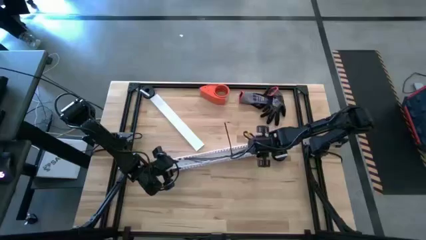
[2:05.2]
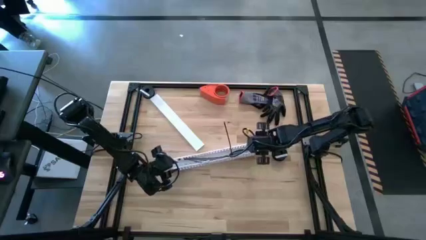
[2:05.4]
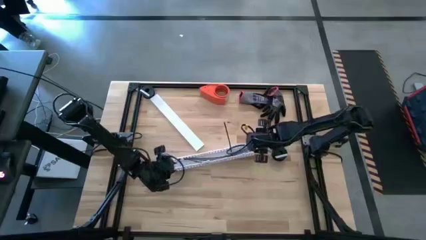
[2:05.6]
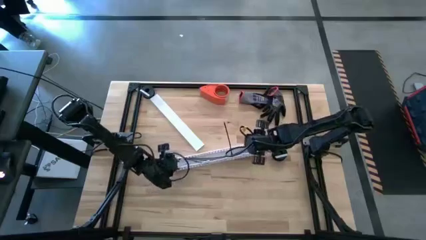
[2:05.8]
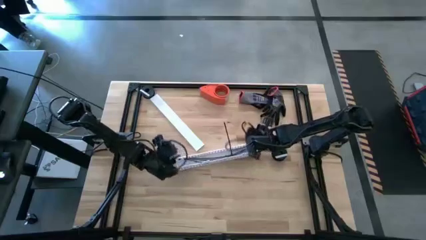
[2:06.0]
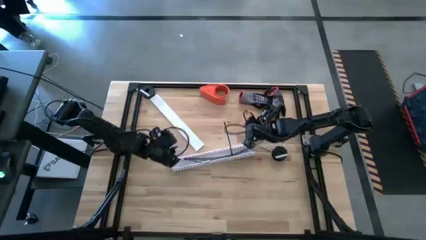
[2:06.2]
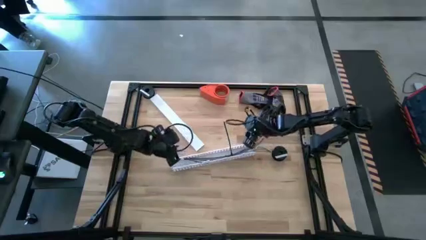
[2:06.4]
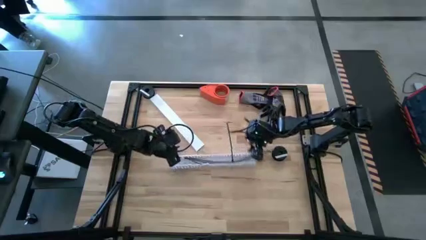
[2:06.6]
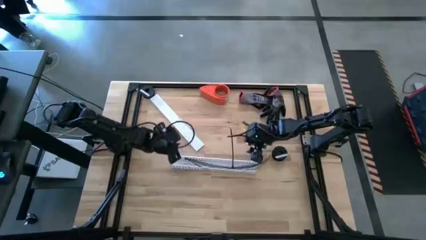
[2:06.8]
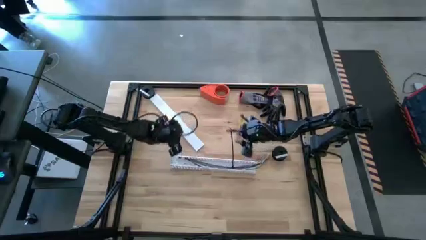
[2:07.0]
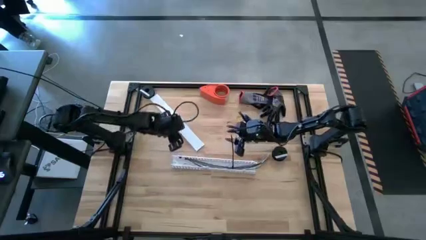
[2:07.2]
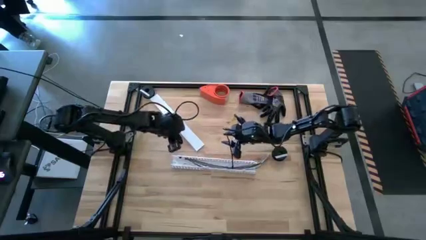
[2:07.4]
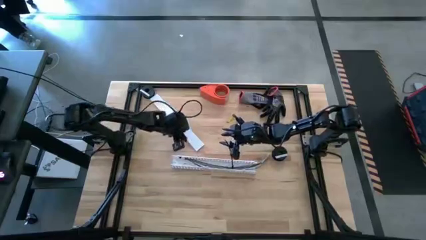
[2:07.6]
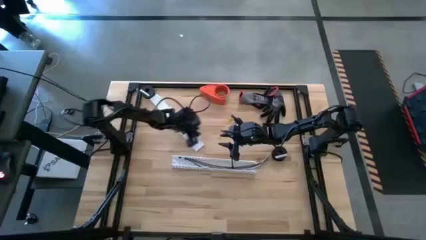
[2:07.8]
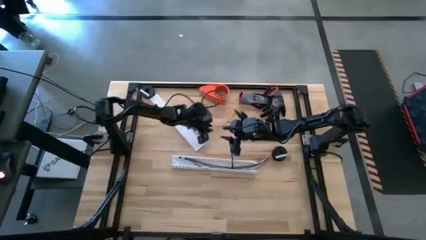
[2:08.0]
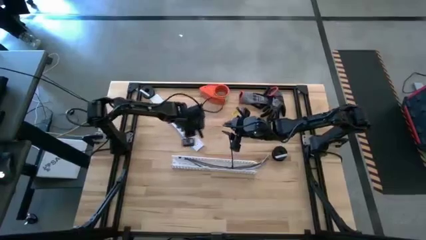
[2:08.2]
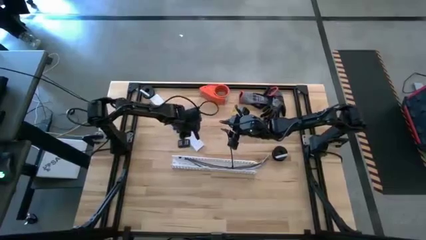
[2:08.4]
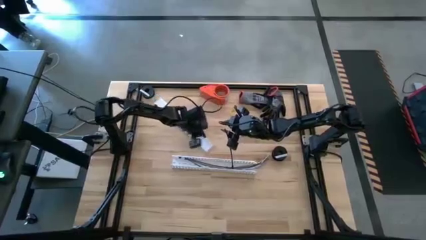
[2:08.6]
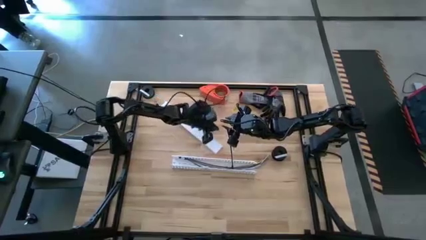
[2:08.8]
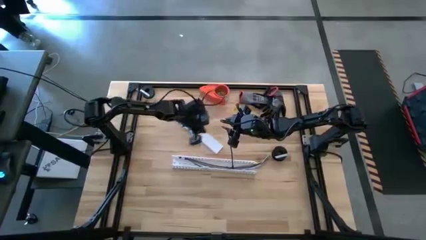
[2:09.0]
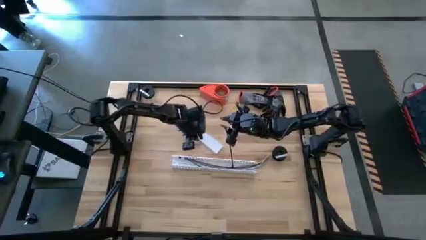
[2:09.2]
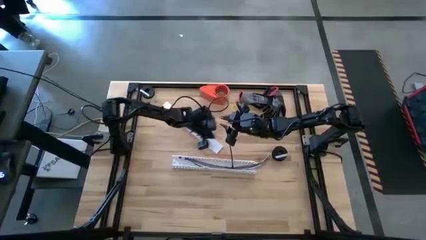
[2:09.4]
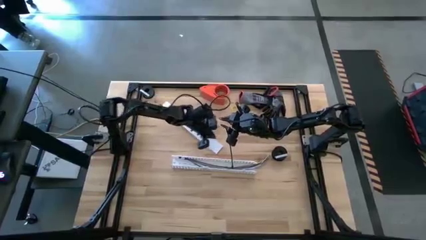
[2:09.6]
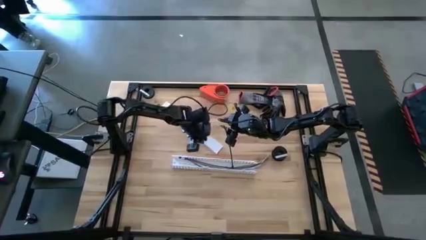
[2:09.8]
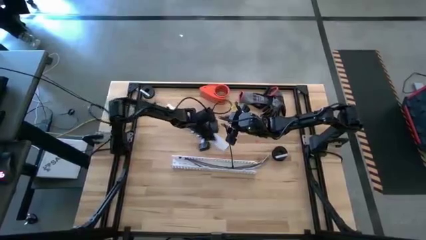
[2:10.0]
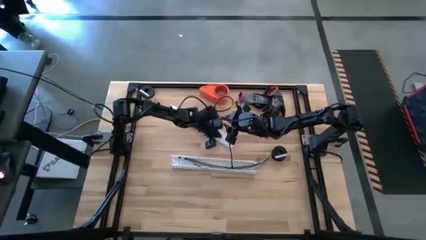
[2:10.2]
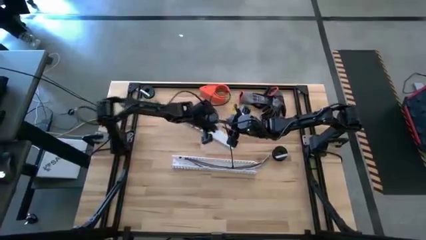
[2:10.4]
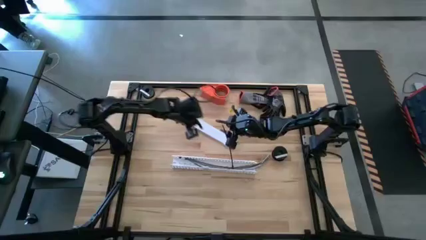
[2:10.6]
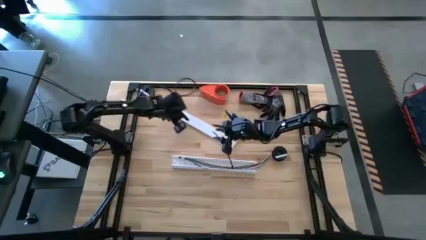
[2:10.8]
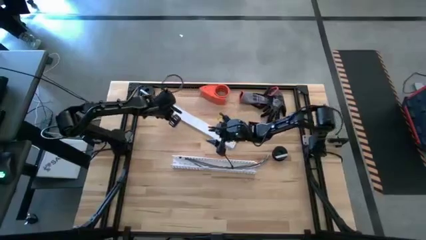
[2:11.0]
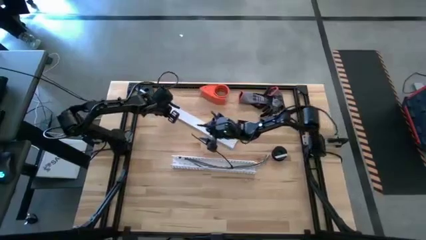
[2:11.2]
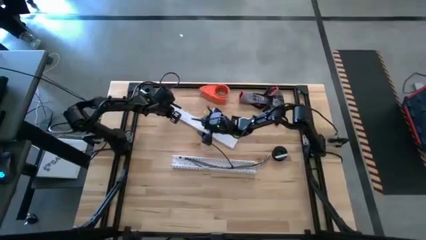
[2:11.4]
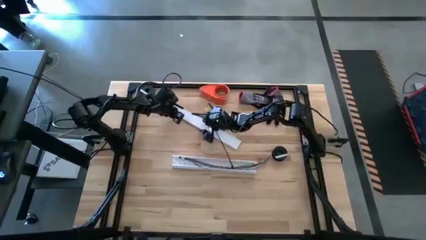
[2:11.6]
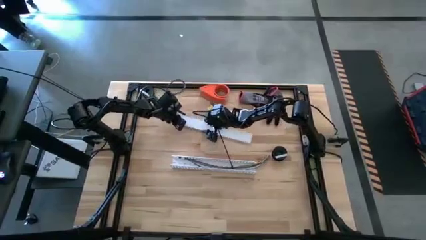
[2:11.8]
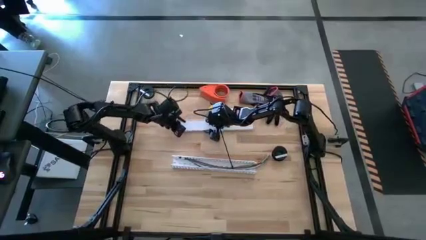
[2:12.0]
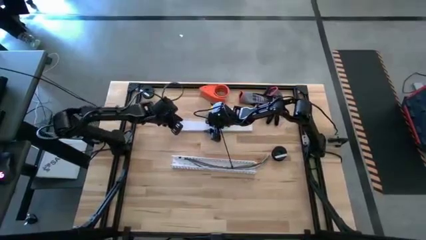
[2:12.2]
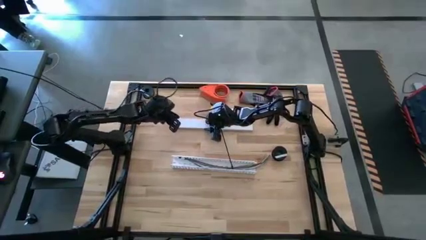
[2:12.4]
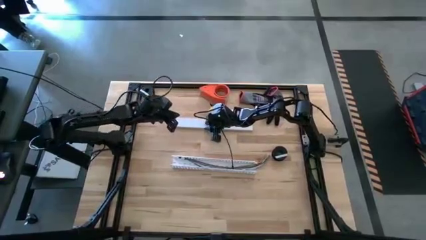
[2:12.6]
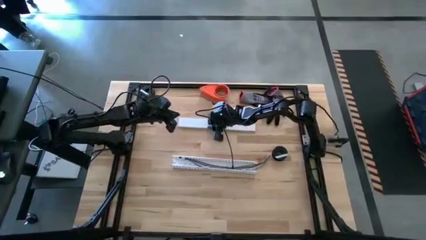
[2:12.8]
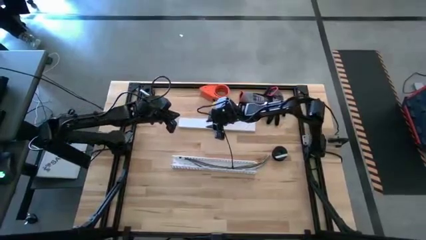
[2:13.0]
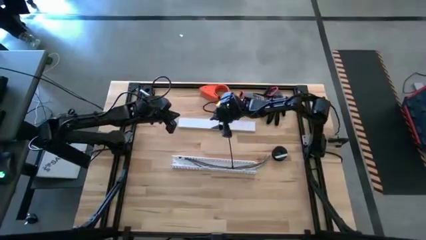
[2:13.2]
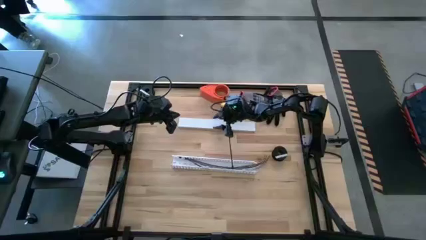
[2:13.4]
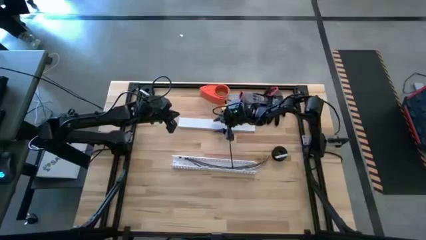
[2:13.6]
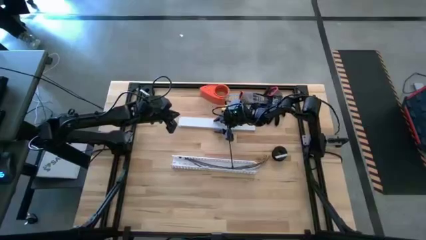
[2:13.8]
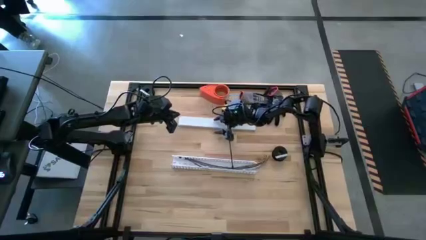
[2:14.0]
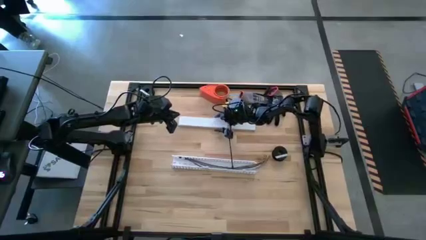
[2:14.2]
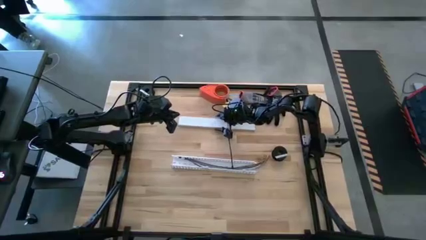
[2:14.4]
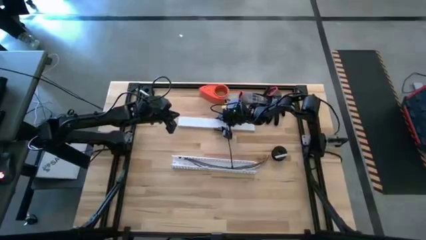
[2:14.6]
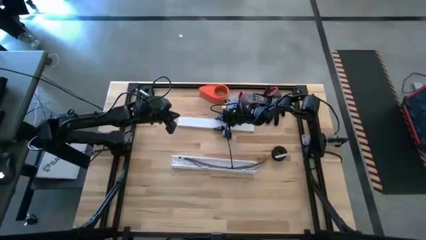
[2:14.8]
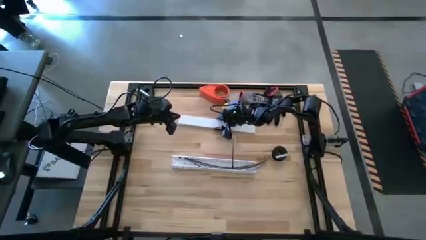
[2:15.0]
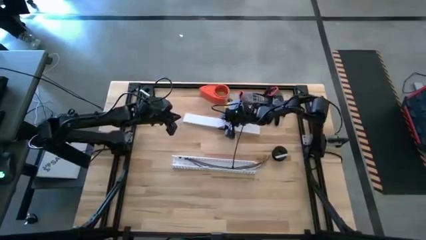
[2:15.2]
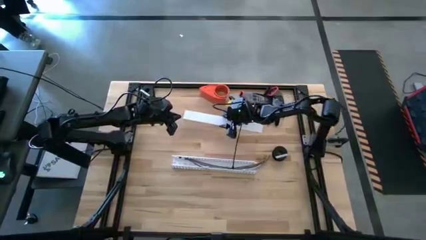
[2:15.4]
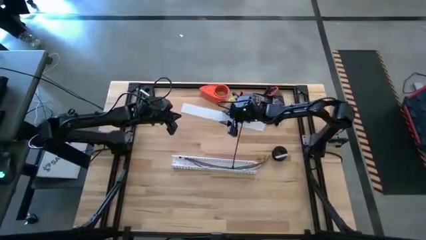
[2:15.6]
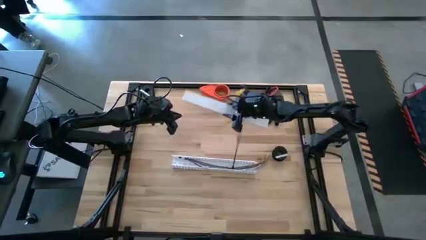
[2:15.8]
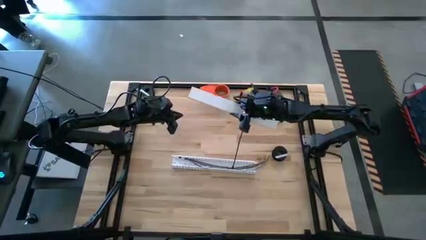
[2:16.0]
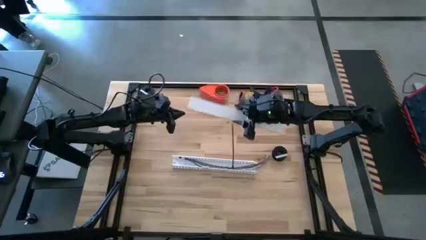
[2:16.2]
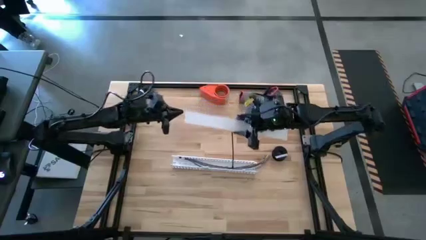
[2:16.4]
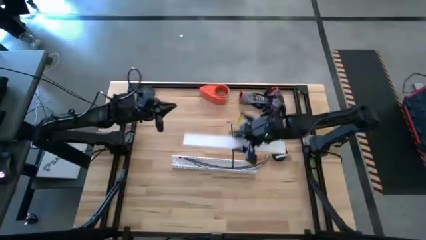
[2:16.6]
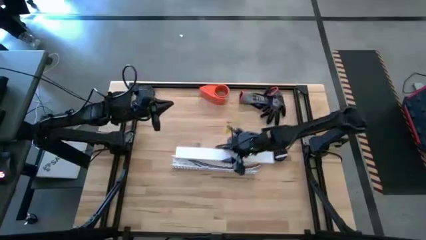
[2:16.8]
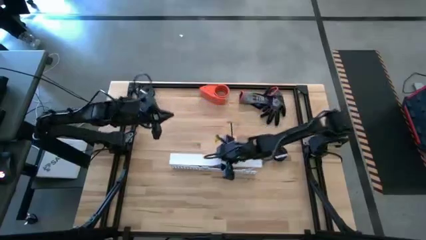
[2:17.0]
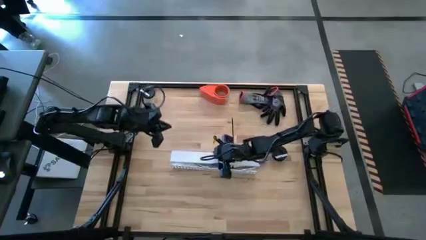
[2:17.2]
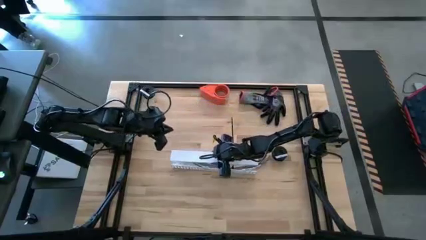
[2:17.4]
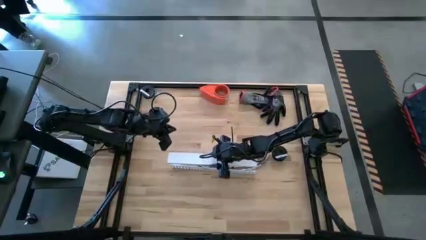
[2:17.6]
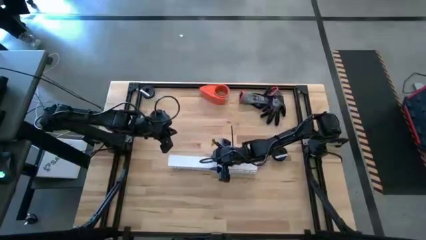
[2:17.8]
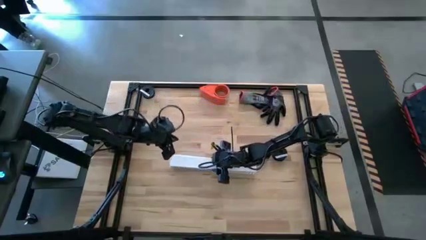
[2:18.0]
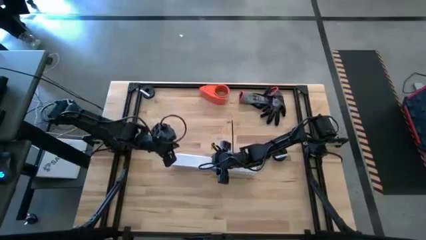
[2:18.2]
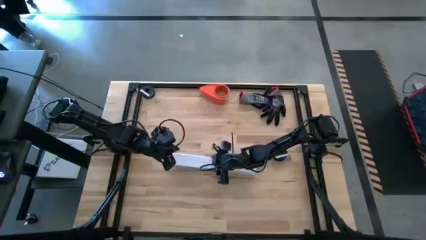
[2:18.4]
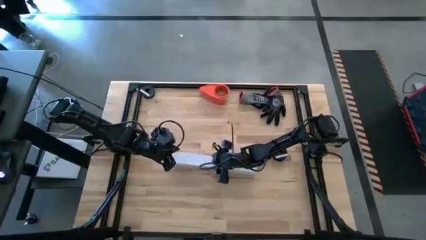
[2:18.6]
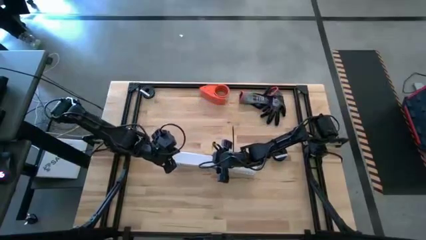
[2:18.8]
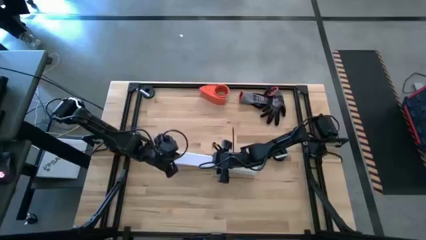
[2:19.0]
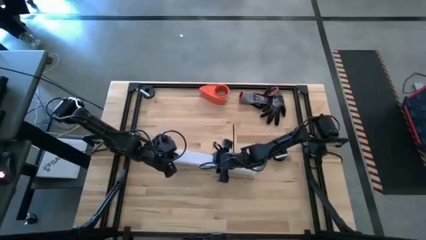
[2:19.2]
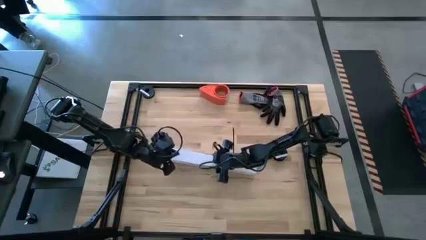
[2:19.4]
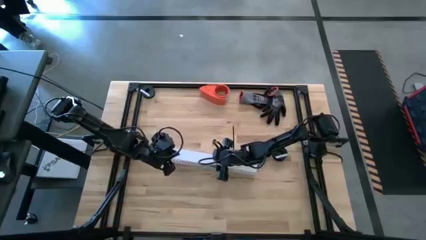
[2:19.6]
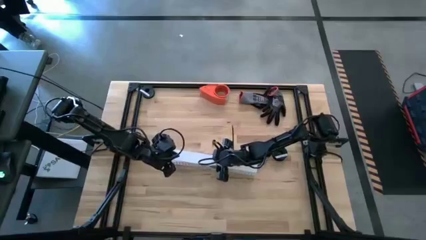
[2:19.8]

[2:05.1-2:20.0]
Task: Ziptie cables
Close the white cable duct
